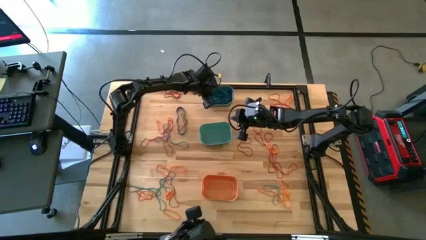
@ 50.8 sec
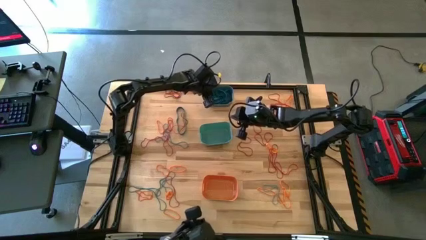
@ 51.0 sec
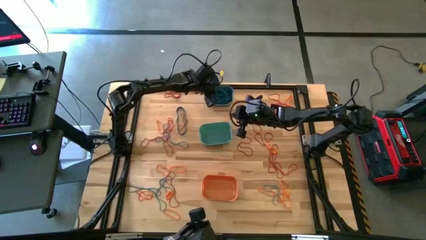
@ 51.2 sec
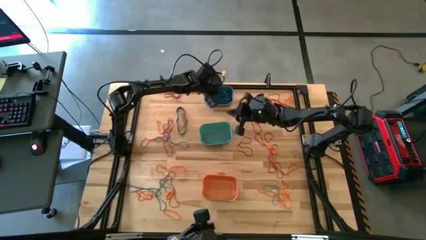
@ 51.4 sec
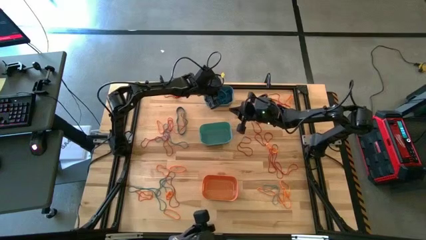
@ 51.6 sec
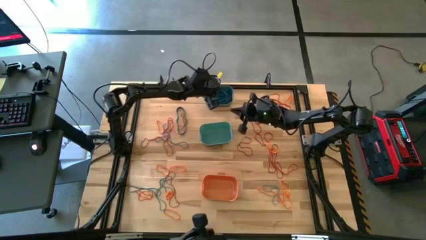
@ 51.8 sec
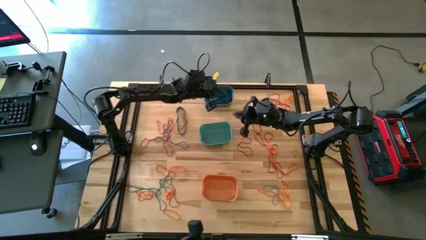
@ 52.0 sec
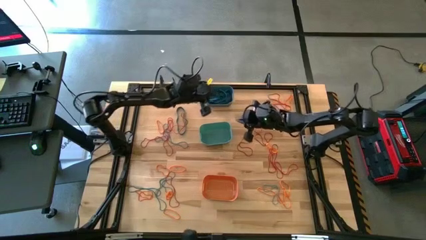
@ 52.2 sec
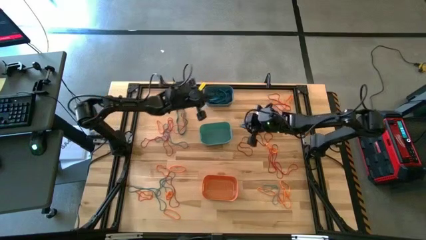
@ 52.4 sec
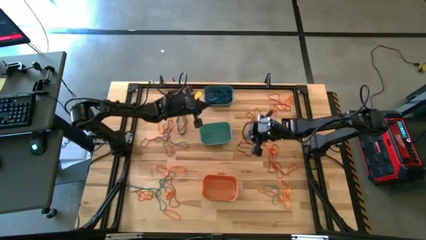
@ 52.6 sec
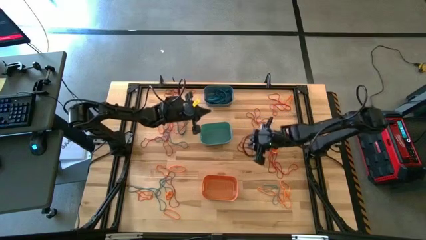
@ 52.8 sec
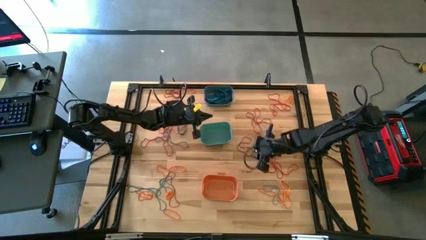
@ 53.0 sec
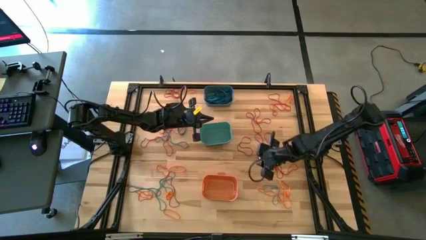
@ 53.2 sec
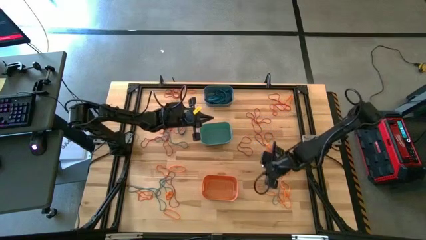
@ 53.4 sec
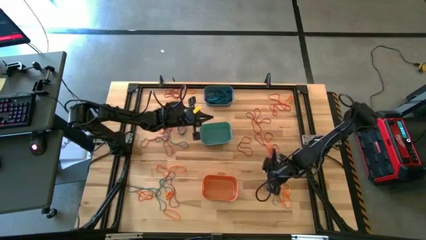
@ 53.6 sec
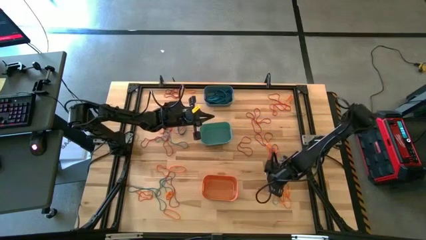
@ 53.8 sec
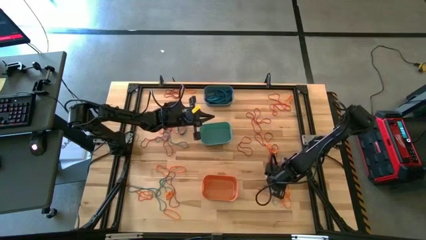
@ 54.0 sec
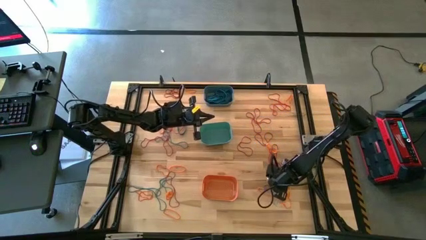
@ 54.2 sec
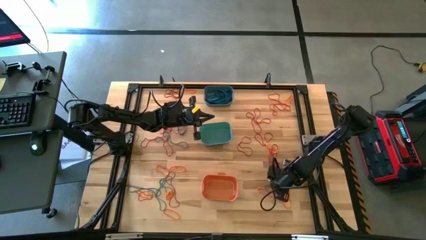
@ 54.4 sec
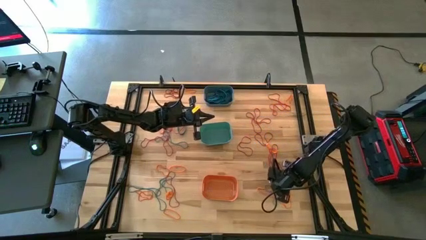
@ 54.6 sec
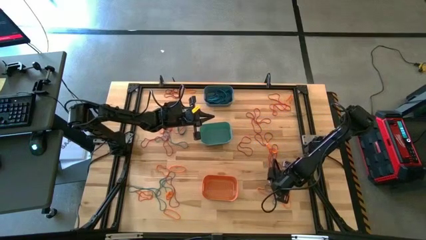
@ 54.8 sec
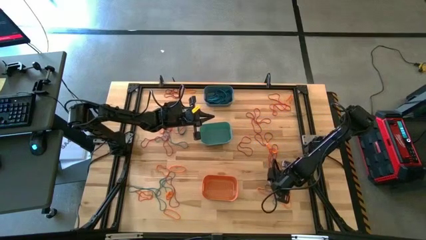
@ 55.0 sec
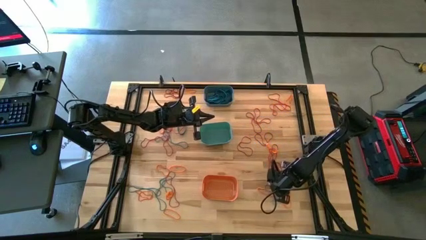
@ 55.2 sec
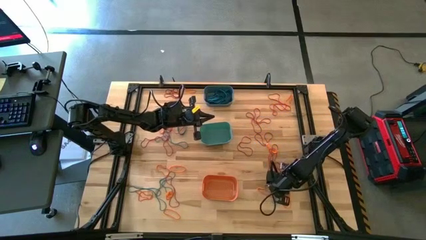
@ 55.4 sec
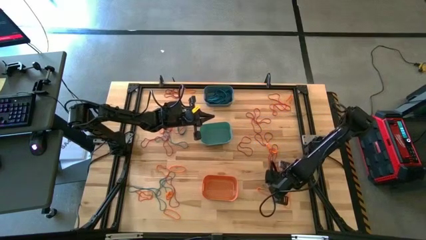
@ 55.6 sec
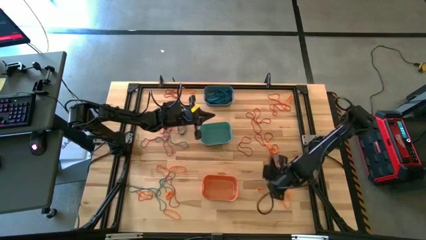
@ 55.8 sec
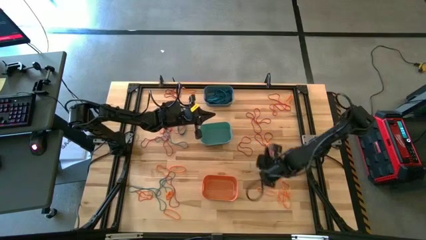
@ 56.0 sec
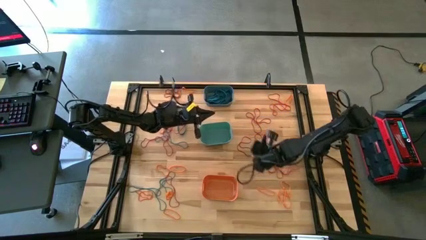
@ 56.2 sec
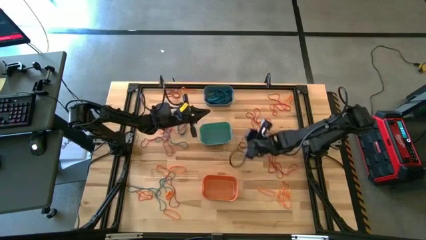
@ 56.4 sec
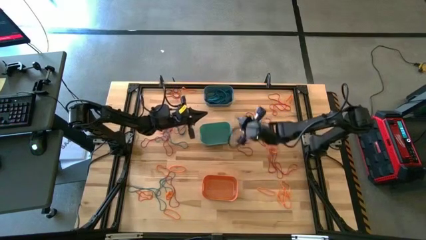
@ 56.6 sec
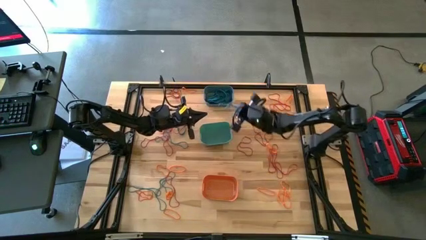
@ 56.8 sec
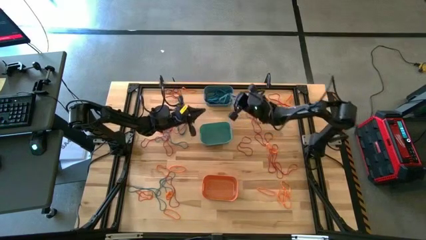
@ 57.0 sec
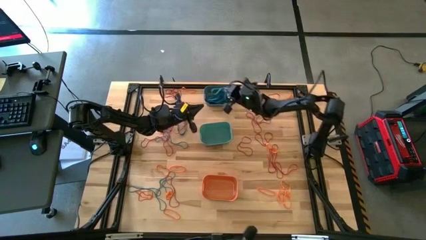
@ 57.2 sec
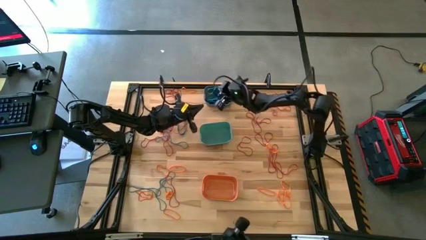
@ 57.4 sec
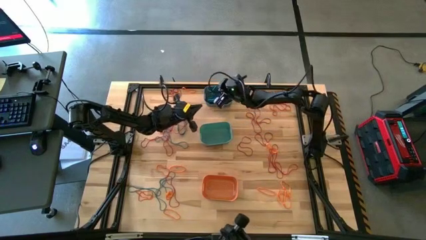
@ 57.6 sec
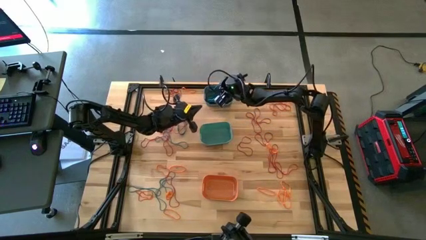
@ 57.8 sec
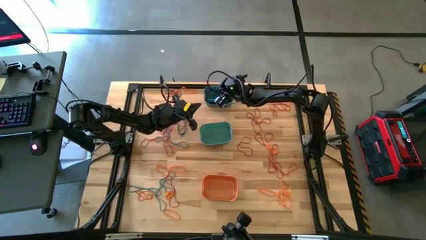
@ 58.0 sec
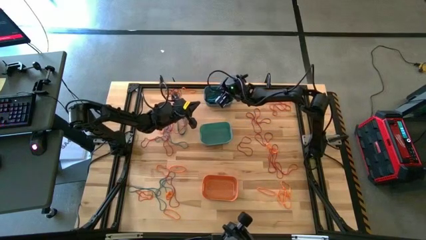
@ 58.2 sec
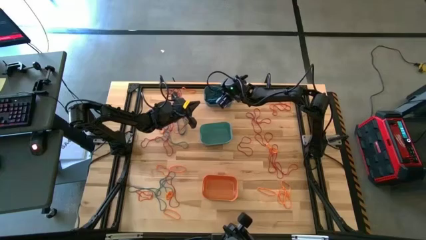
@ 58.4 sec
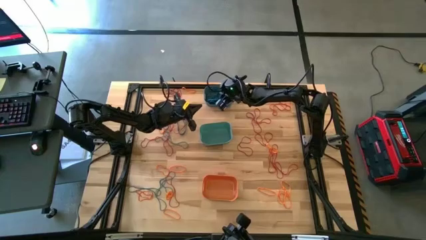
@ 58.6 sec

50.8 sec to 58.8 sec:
Task: Sort rubber bands into baskets
Put the blue rubber band into the blue bin

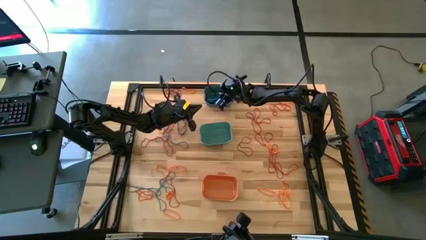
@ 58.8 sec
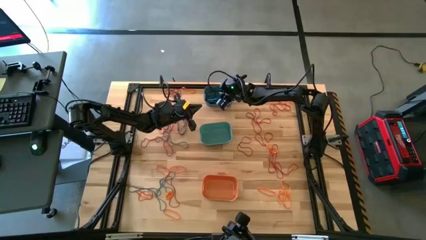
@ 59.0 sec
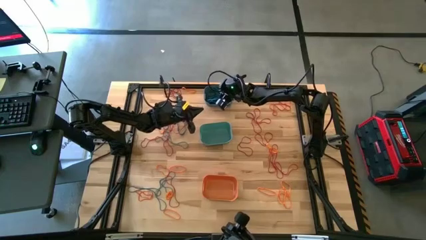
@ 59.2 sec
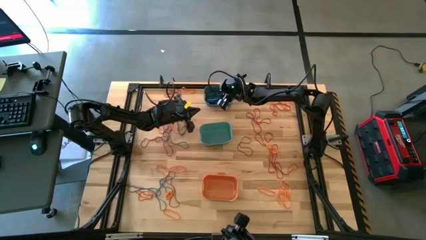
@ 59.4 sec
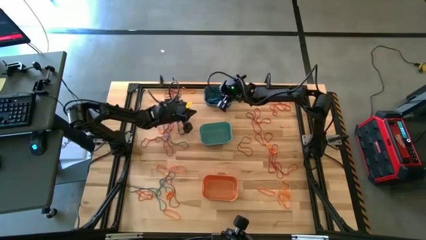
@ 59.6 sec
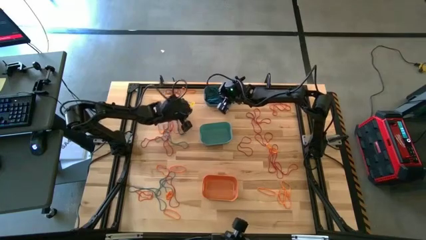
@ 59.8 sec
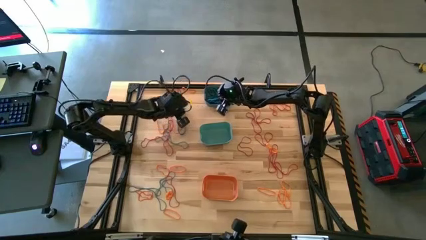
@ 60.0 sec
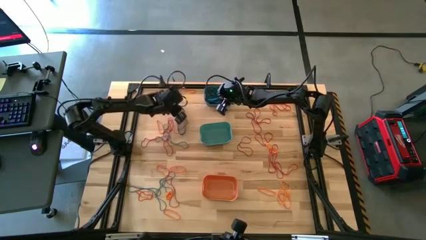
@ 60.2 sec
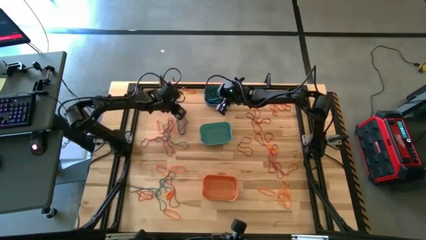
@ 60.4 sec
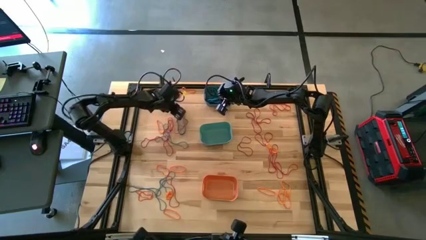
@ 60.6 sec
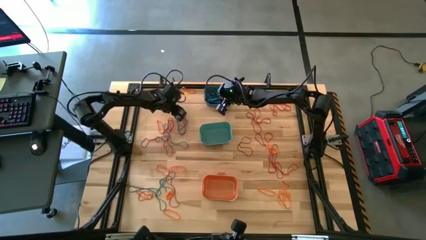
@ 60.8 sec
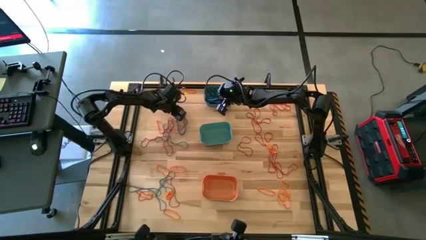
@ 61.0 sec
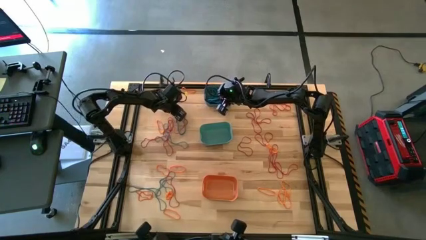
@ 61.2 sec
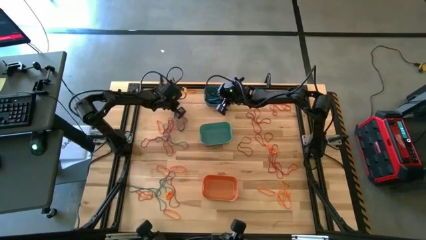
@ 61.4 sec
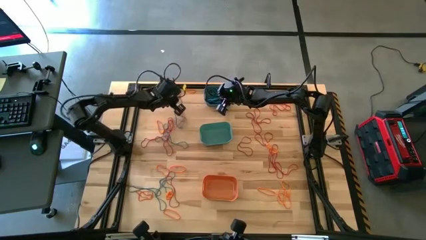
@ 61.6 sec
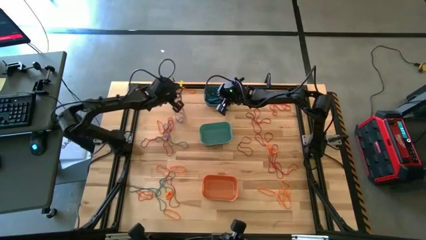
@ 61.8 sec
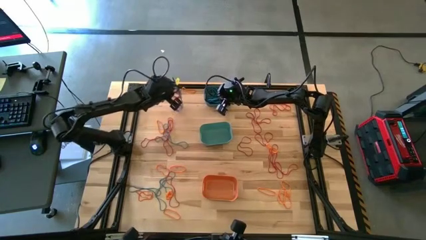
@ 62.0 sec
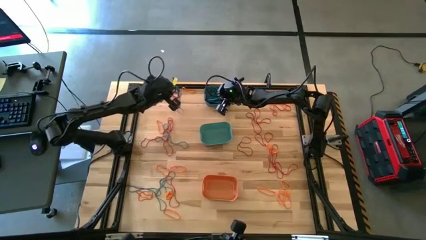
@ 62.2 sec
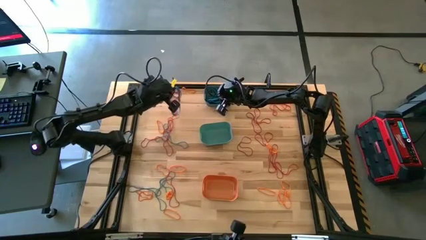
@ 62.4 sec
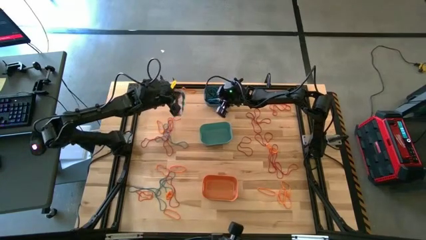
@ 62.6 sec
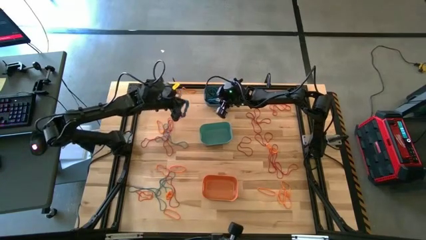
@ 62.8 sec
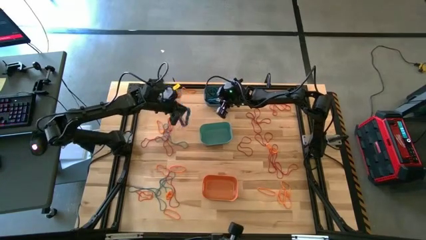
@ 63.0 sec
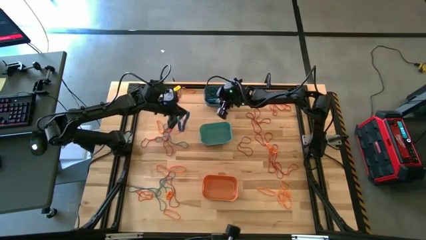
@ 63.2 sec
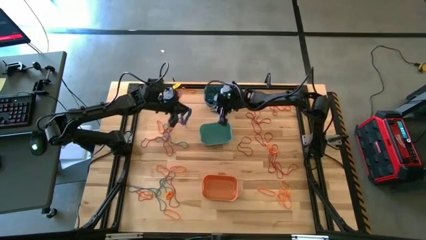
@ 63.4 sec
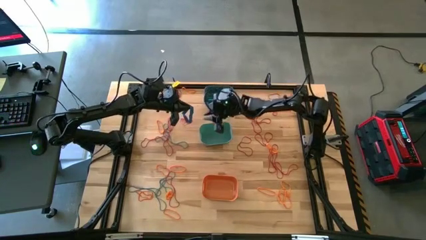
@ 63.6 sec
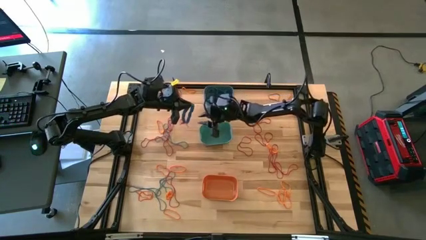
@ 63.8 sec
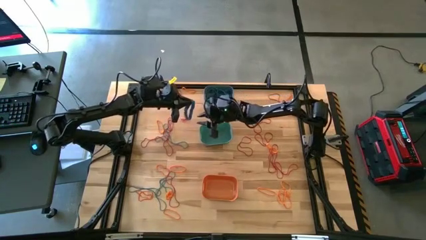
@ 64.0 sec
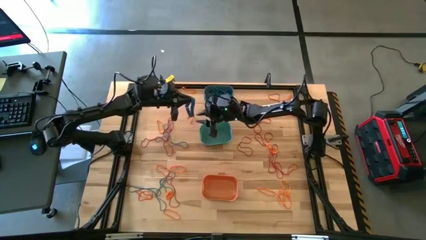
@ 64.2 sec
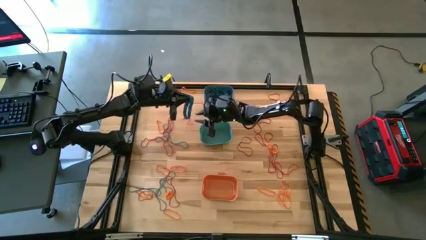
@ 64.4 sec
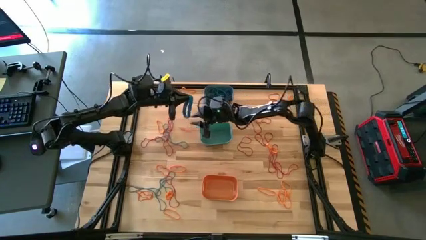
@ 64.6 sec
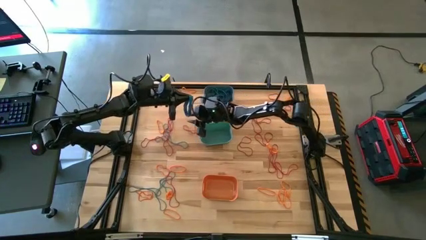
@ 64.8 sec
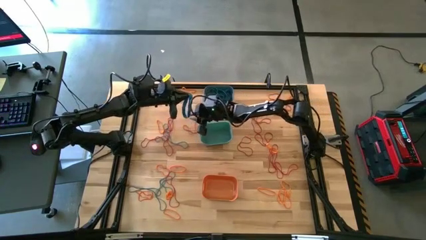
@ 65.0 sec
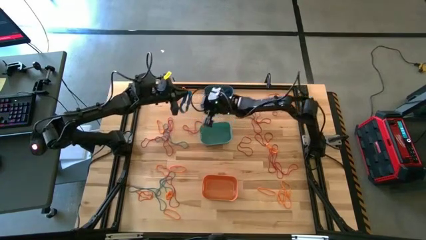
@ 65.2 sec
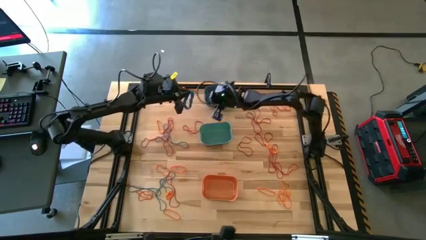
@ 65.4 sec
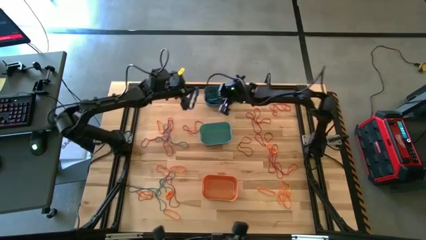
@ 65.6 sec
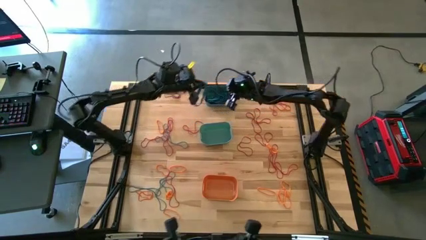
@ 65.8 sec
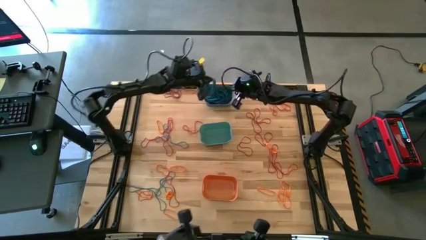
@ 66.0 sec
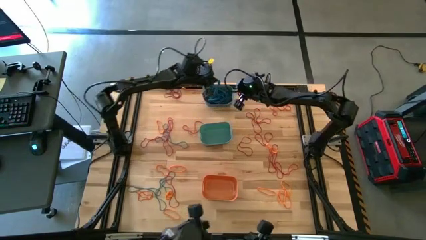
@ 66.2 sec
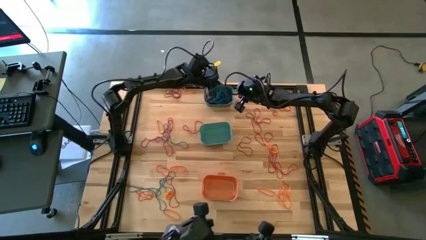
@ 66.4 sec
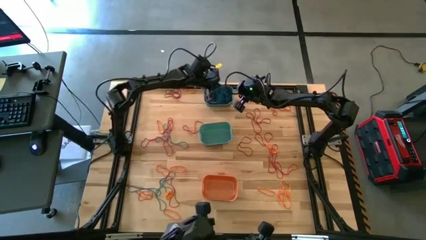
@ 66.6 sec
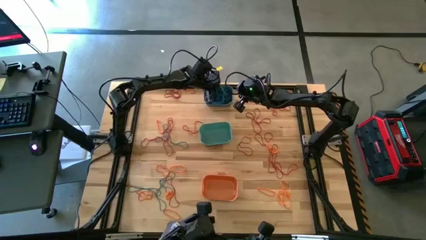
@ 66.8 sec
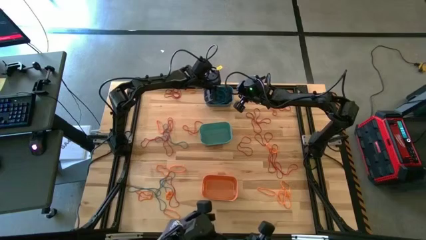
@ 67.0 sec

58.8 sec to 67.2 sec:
Put the blue rubber band into the blue bin
